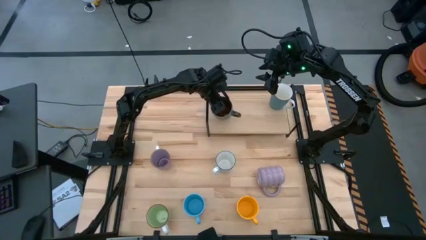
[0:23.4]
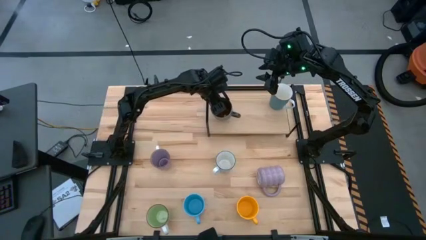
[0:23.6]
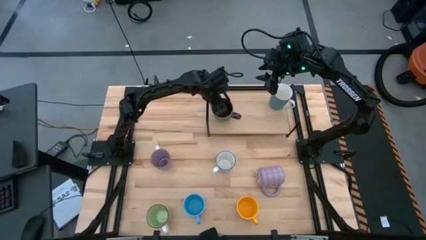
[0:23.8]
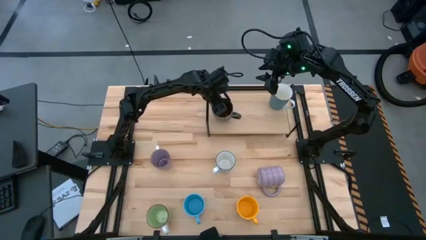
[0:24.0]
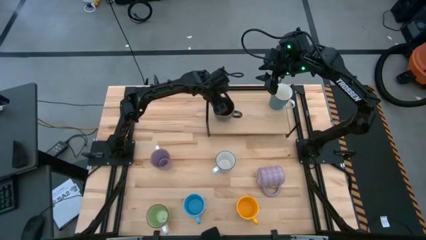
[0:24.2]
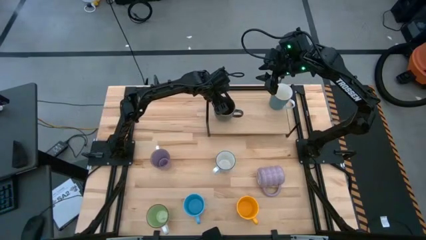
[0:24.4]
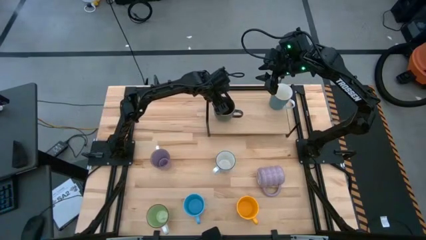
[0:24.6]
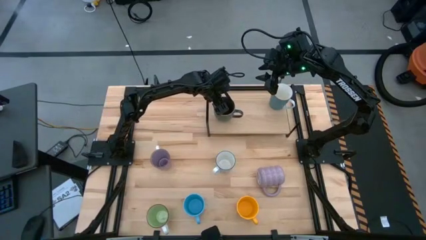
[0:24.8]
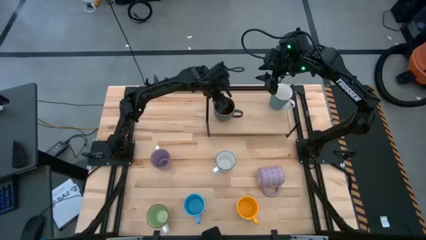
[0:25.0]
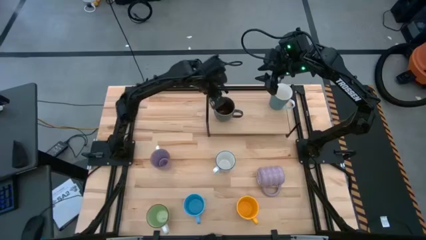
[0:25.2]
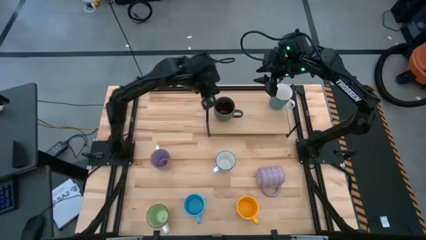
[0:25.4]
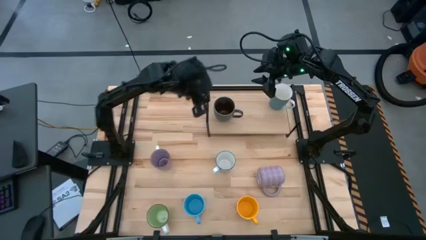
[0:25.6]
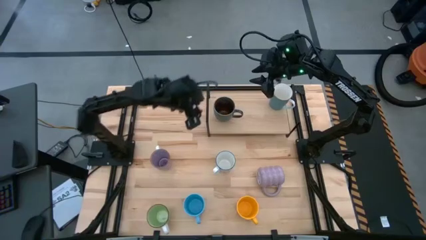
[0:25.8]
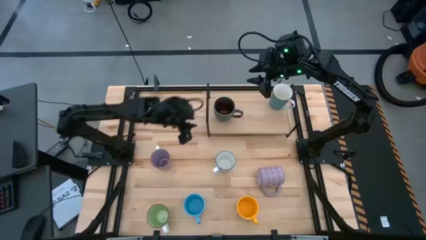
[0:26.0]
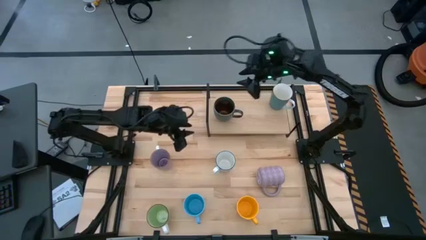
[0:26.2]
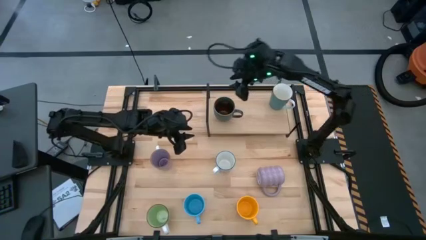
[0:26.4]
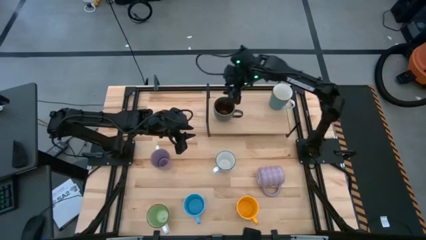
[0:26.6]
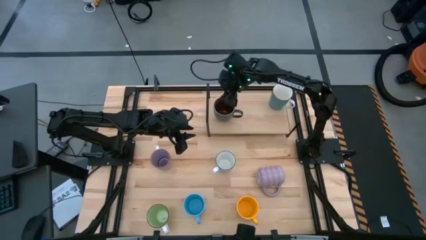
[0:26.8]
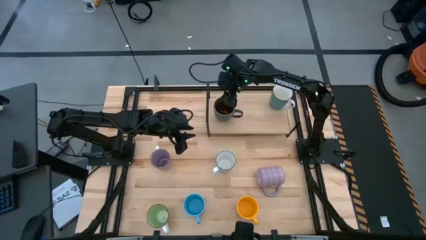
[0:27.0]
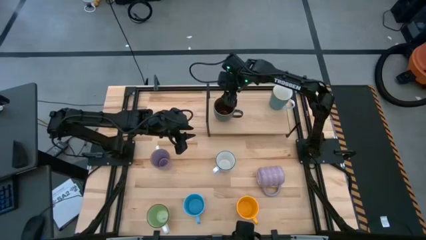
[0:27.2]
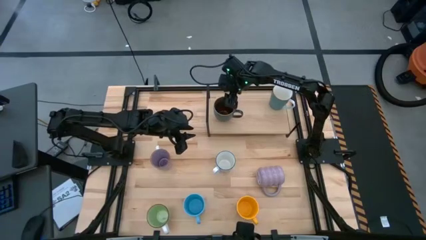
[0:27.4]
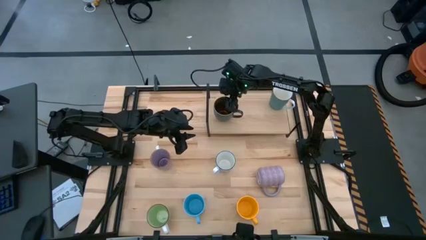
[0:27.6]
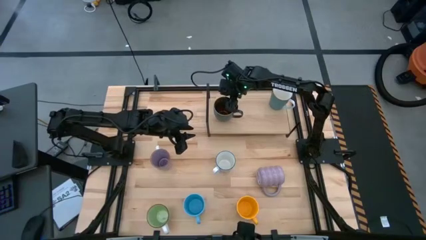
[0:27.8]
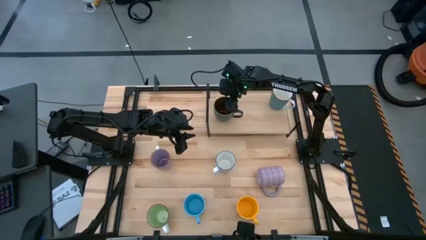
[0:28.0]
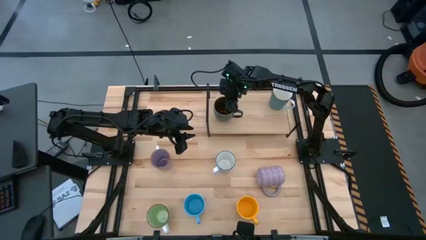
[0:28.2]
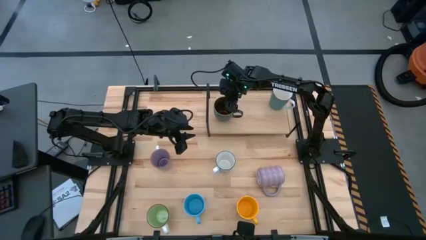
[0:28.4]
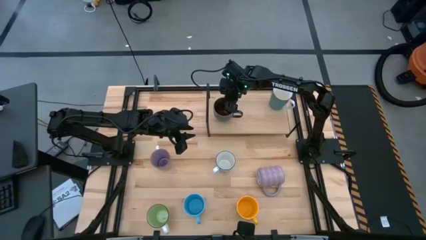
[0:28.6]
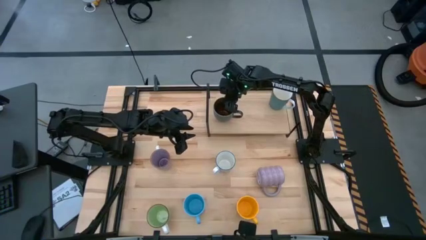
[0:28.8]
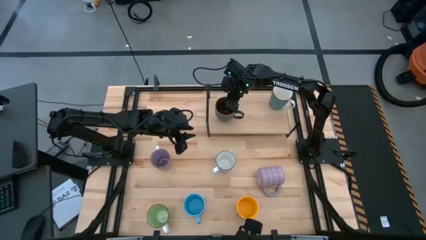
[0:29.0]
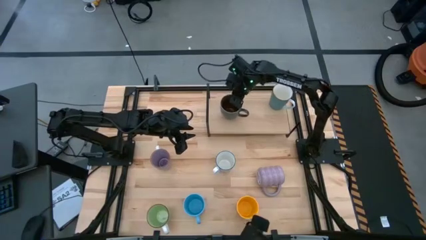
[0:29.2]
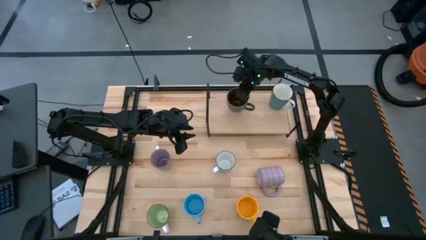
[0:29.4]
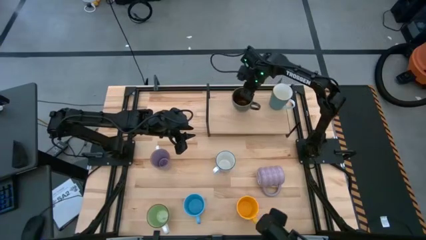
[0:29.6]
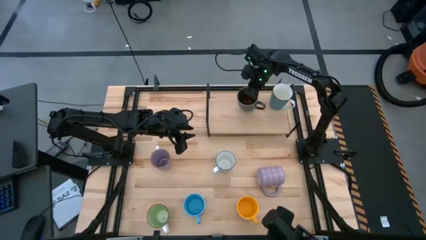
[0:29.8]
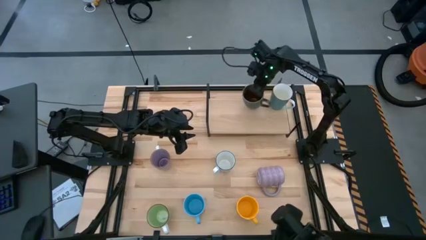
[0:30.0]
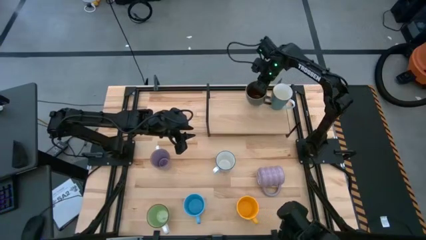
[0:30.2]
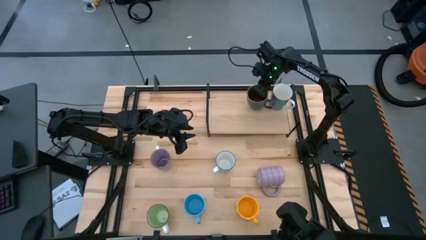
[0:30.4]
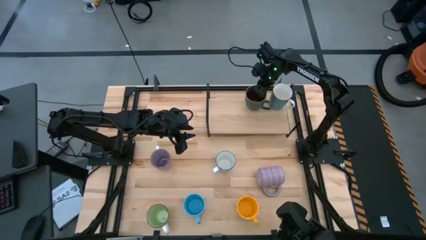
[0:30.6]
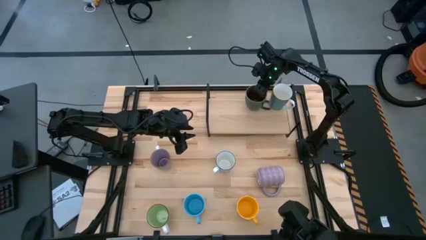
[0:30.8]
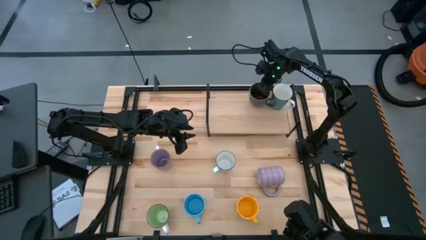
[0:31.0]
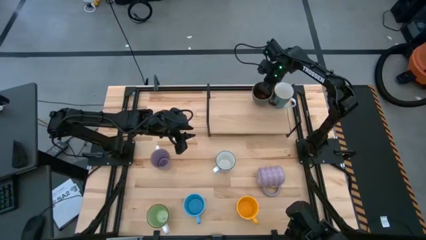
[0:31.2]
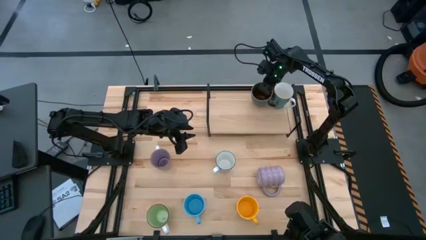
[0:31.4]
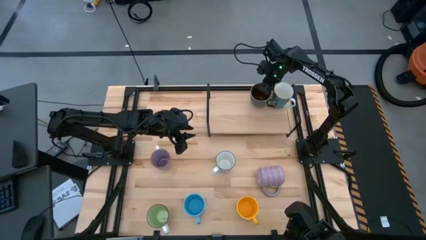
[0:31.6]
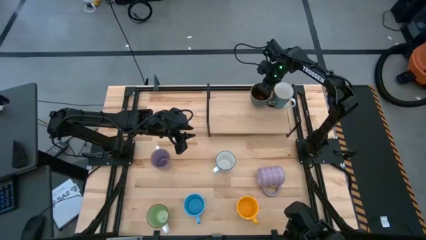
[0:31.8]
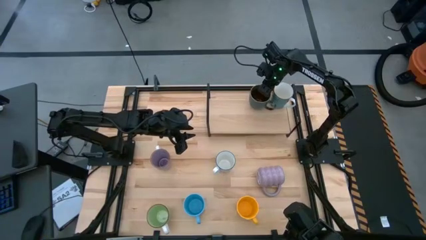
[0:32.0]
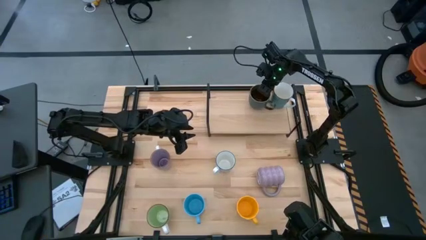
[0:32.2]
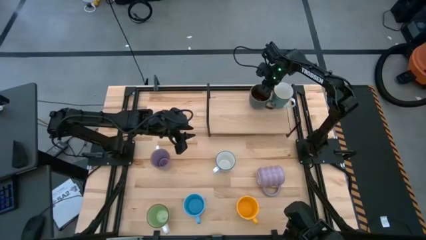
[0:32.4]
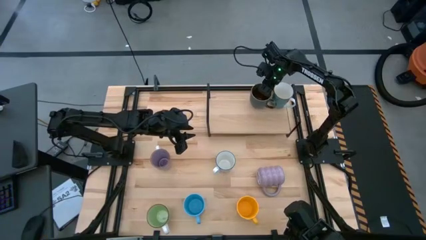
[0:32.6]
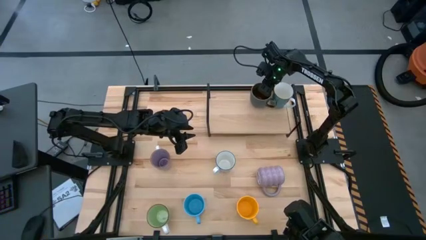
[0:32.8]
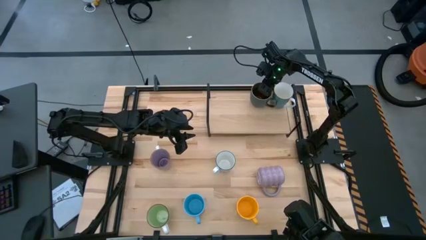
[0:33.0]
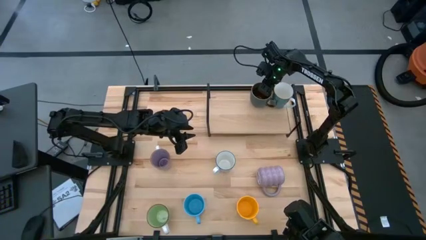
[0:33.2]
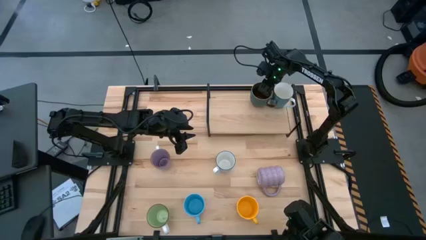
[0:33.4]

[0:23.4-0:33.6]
Task: Place coffee mugs
Put the blue patterned mug on the shelf

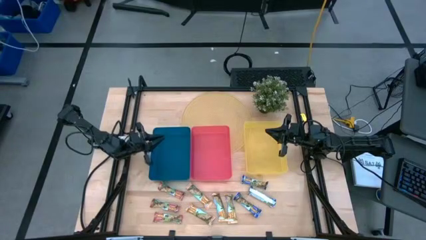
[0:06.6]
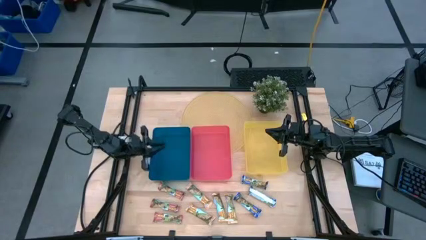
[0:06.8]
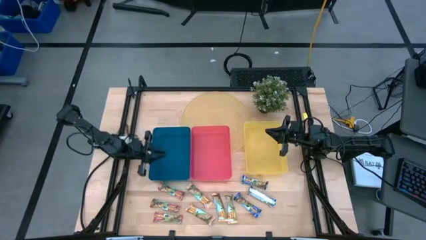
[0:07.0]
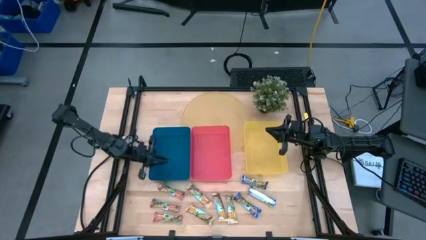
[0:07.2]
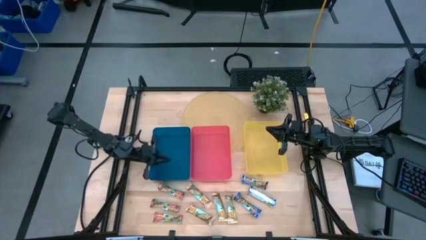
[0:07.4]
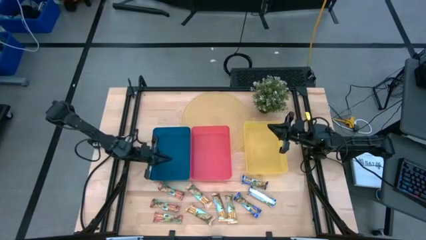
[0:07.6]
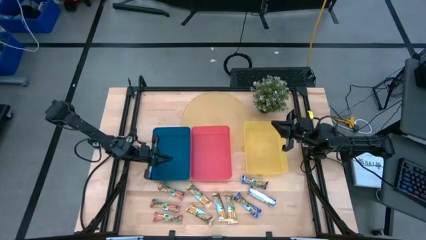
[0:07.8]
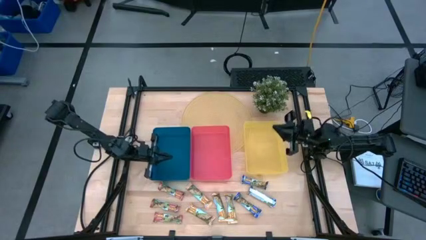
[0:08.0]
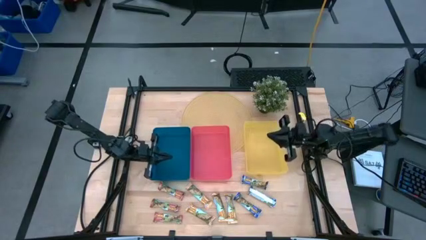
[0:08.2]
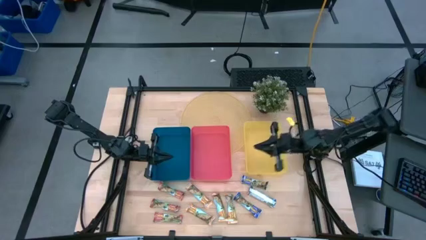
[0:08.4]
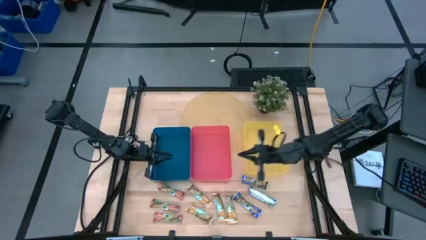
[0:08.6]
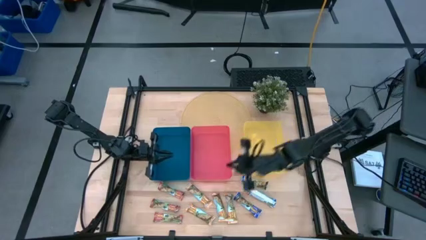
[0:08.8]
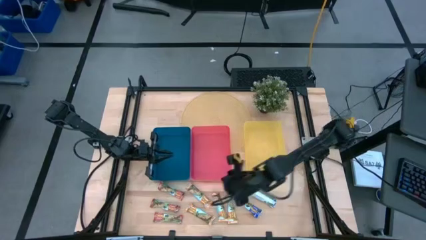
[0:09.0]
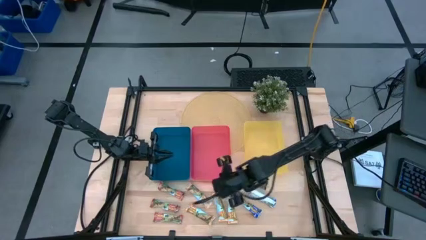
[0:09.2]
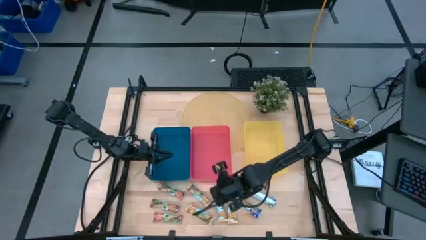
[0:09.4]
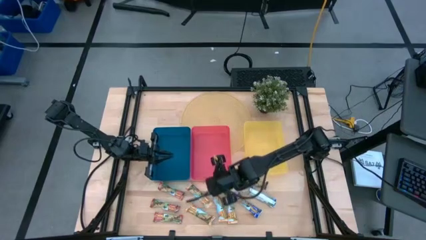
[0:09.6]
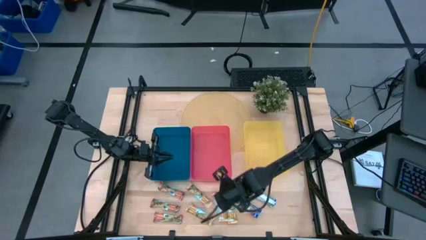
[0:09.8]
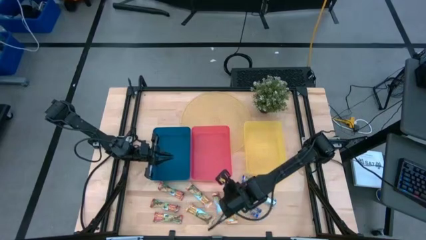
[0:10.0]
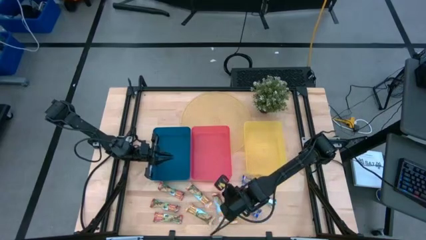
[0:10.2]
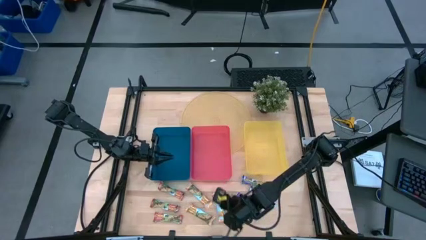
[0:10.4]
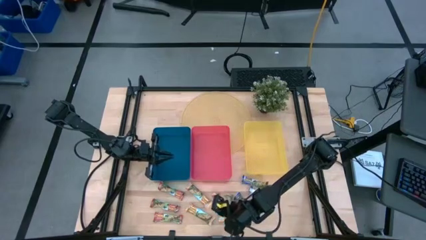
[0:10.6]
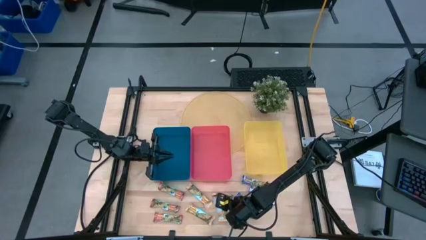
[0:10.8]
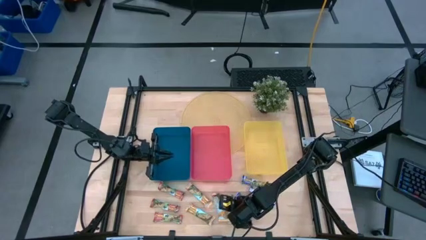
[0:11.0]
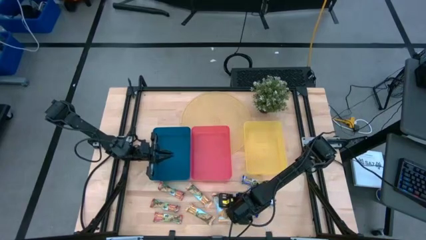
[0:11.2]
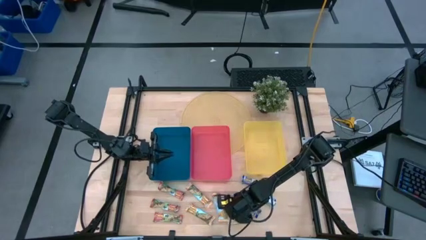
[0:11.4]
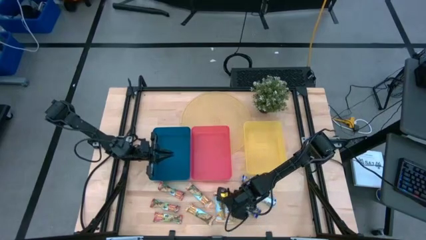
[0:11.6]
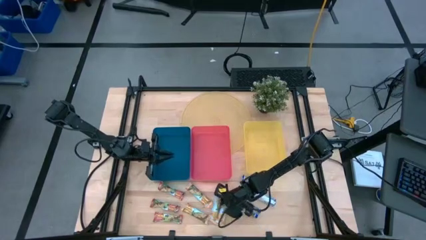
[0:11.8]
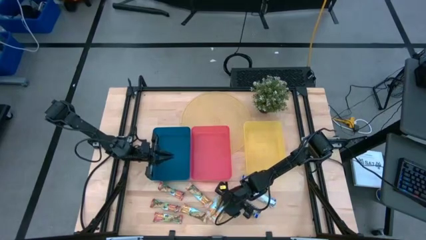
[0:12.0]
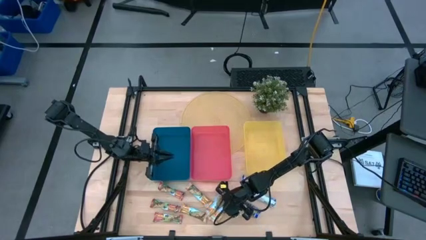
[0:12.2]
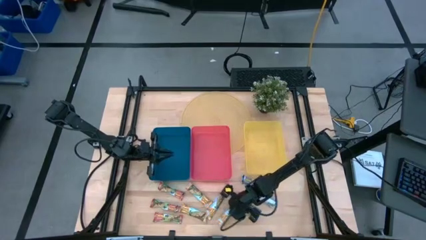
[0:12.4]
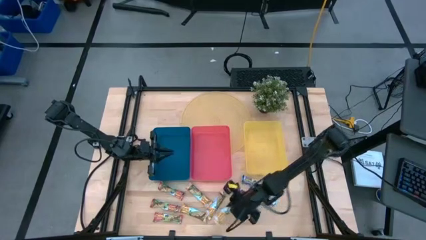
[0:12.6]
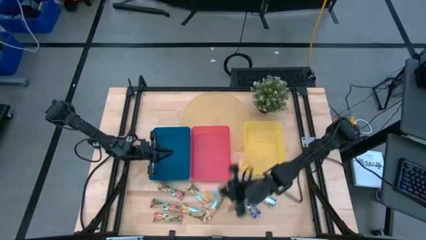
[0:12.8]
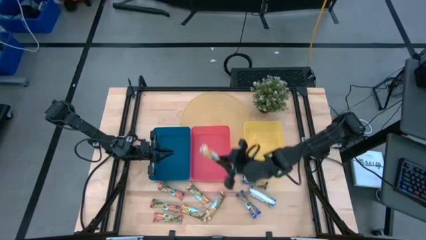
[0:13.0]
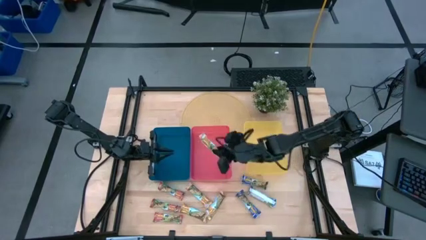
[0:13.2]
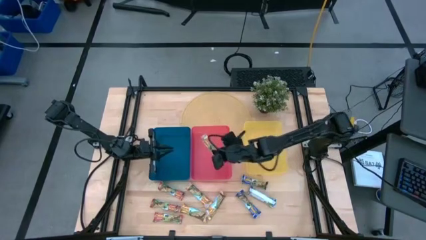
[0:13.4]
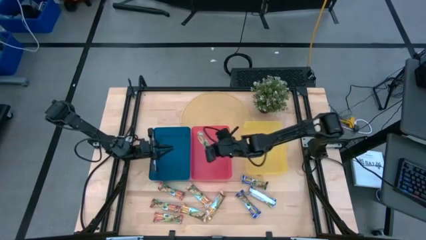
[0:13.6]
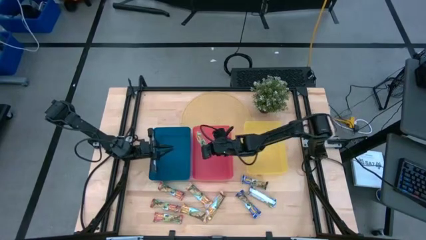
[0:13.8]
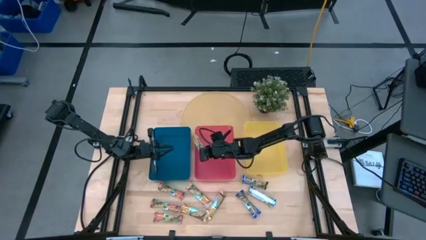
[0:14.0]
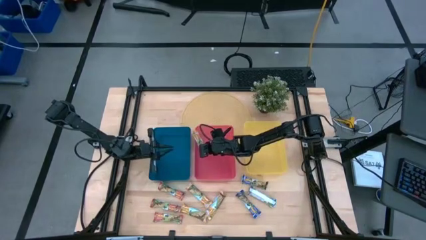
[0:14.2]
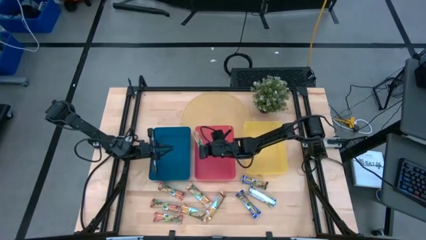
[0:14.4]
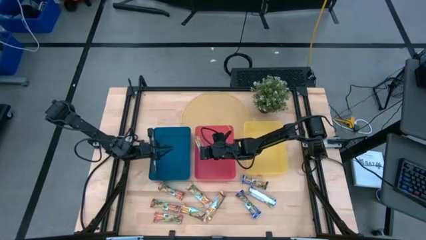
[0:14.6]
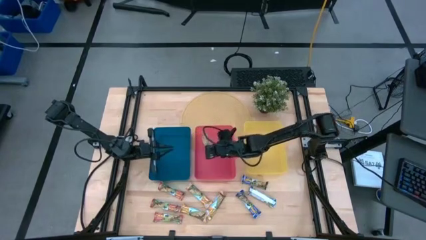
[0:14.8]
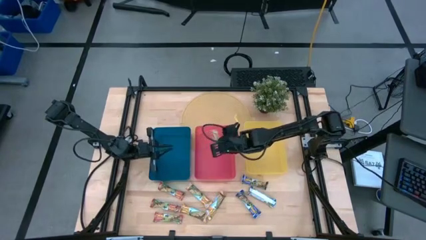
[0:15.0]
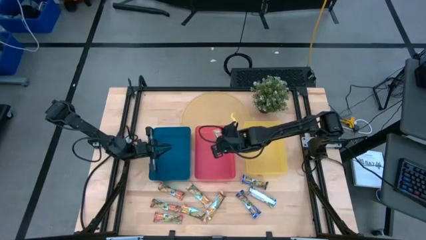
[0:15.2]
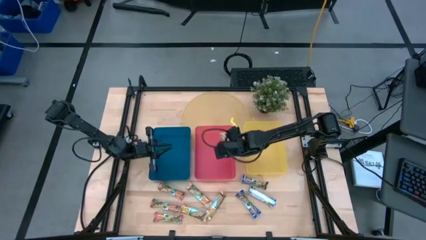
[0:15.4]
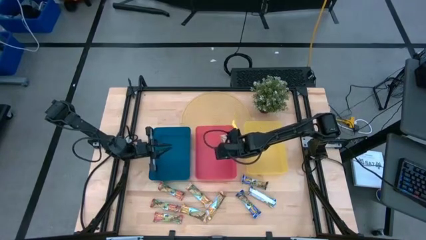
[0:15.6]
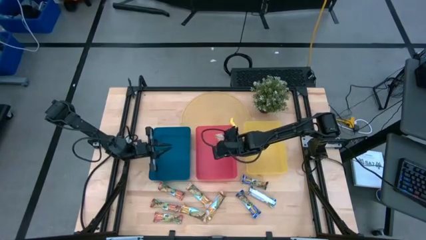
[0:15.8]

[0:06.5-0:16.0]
Task: Pick and place Granola Bars by type
Put the orange granola bar into the red bin
